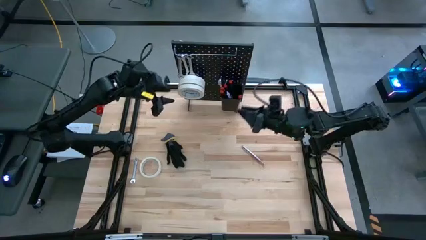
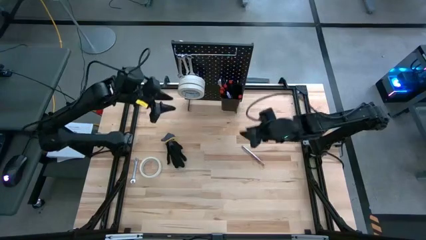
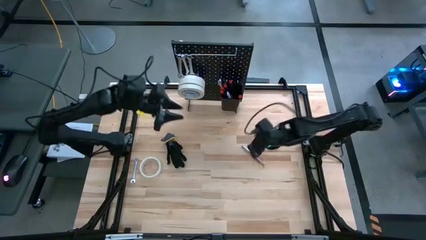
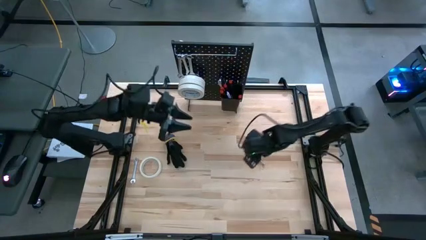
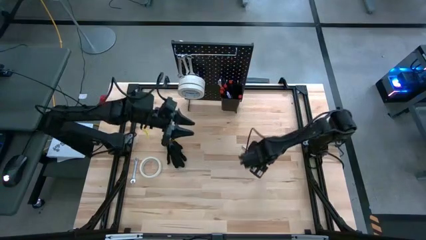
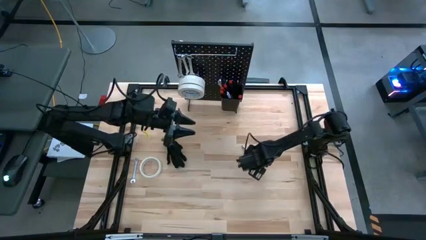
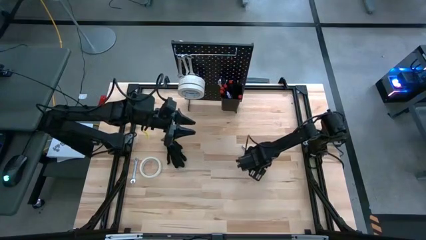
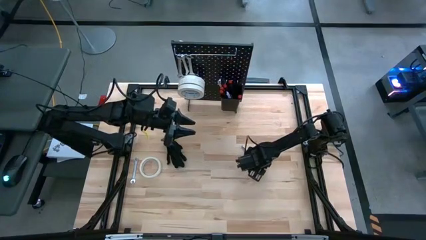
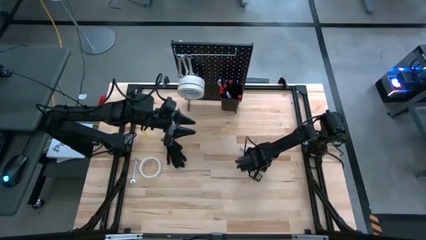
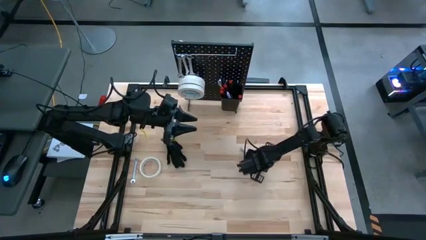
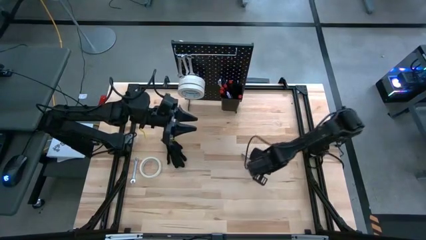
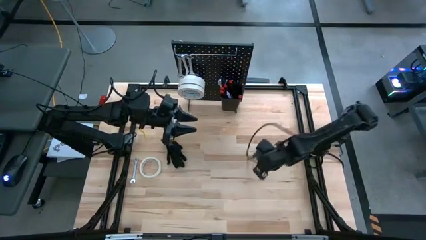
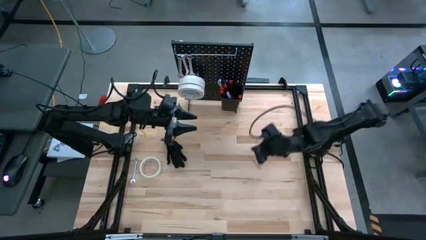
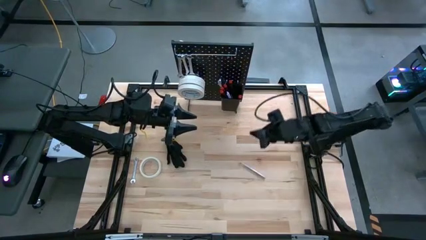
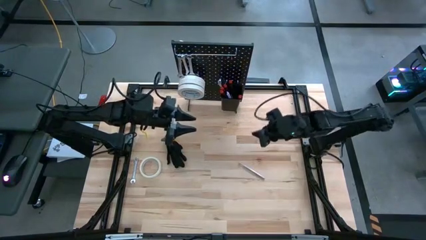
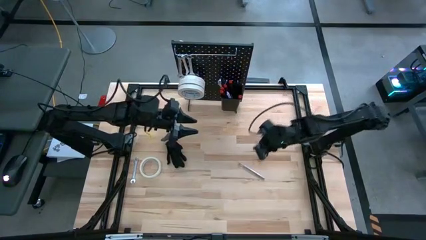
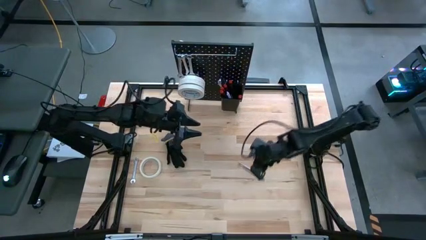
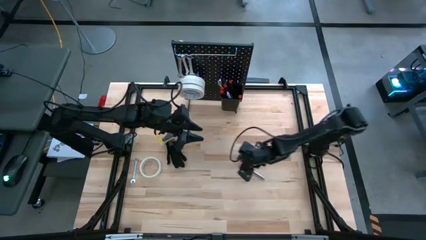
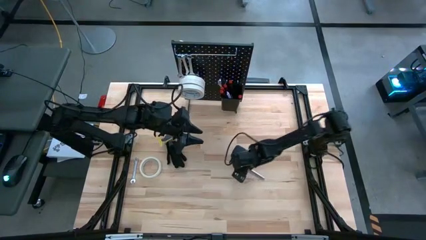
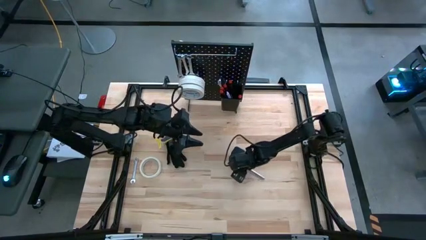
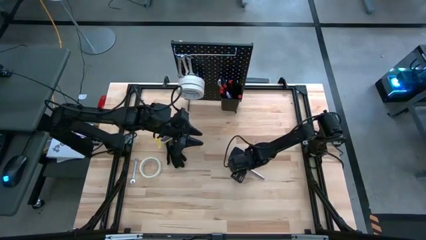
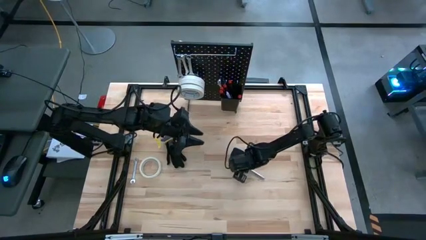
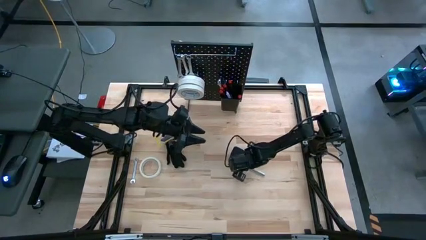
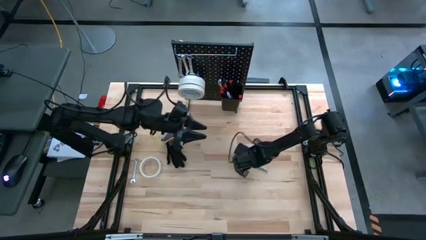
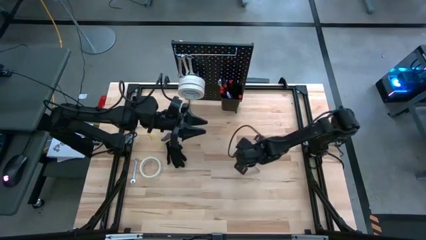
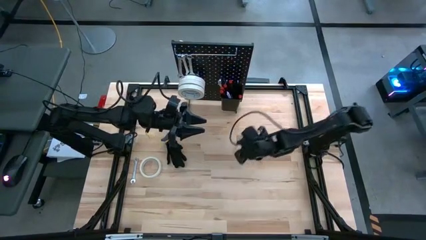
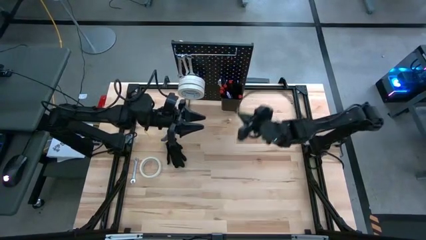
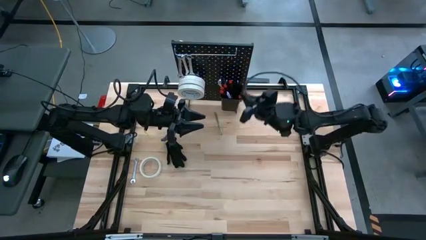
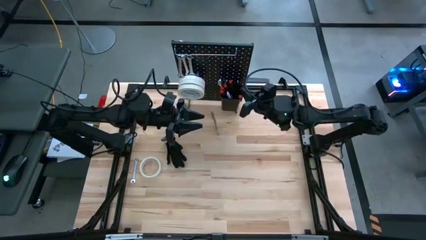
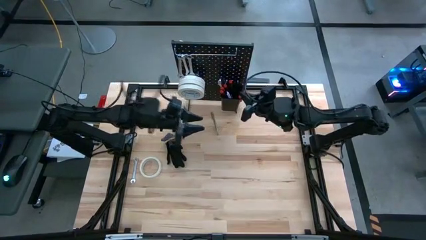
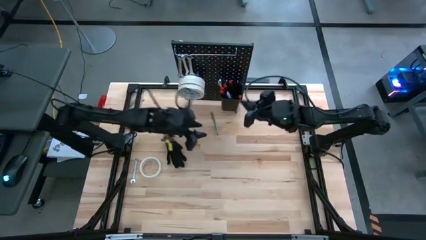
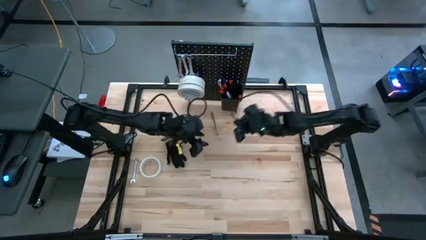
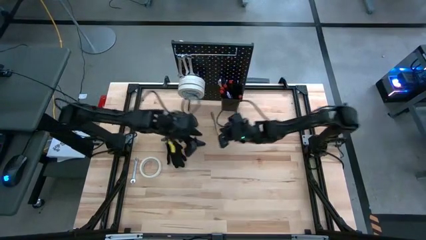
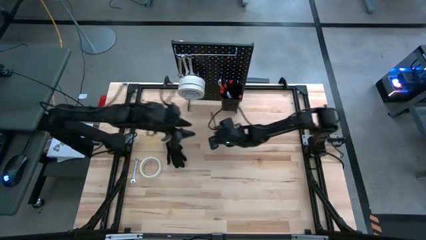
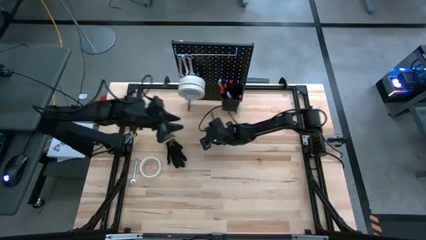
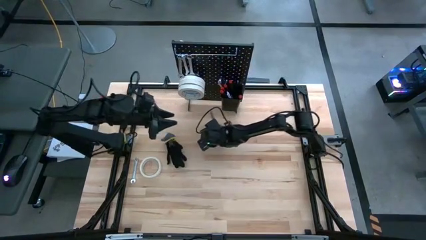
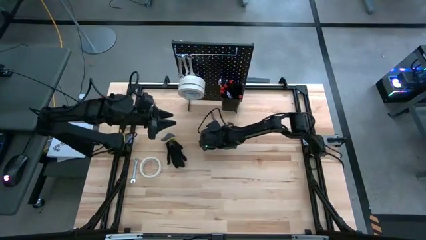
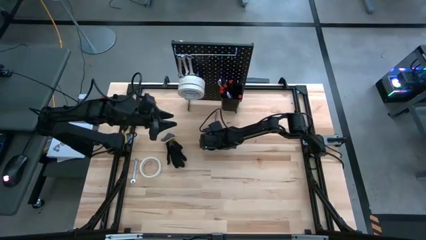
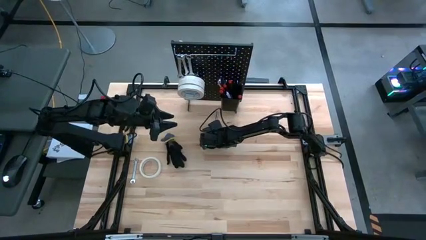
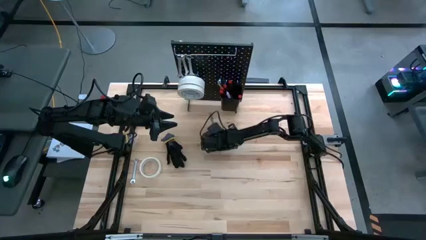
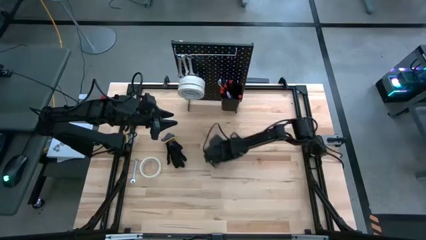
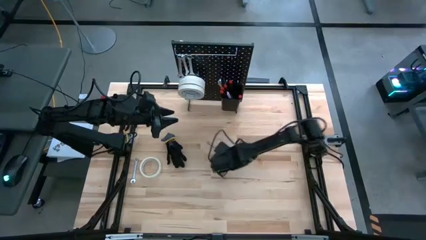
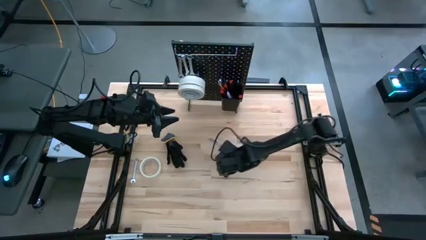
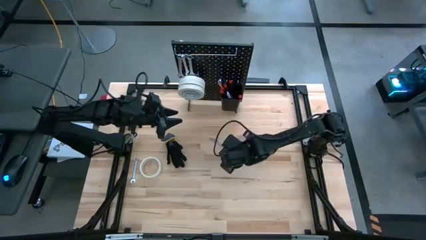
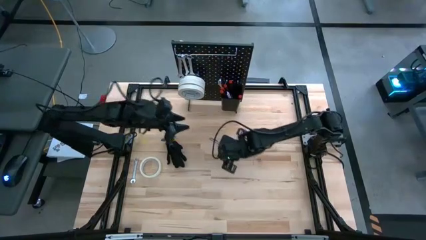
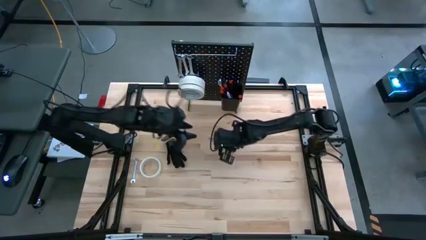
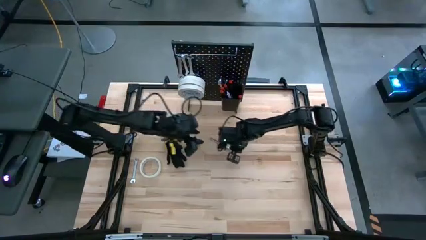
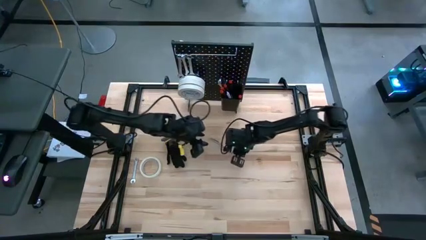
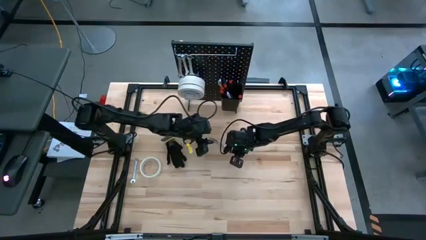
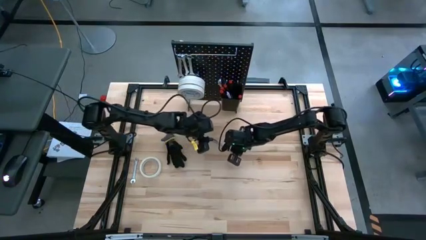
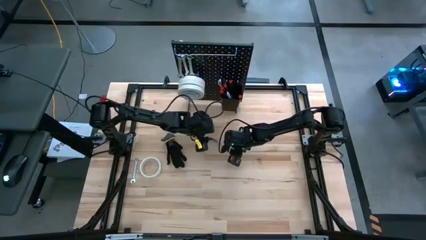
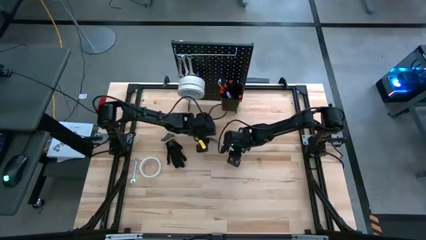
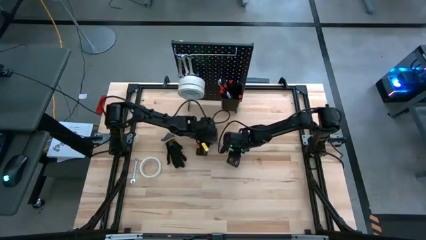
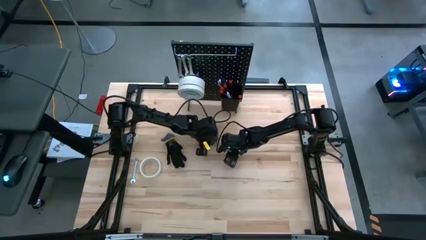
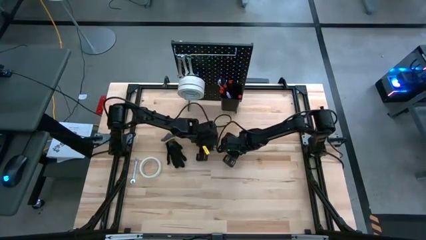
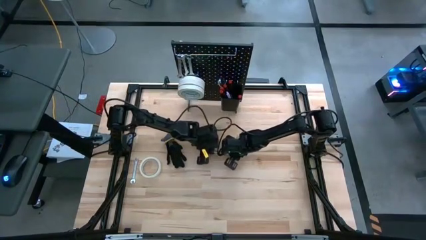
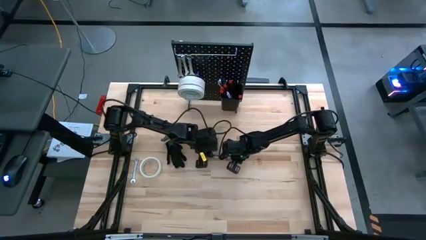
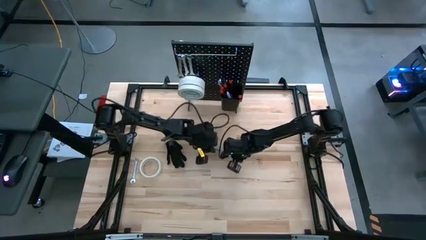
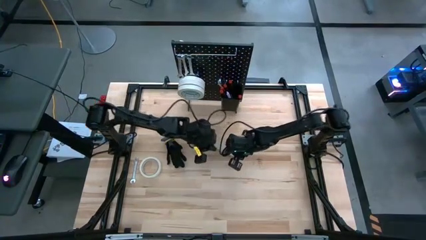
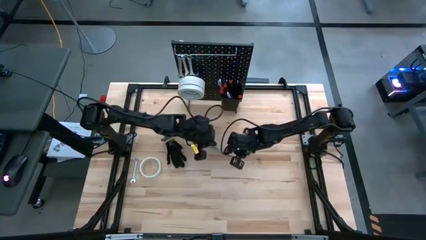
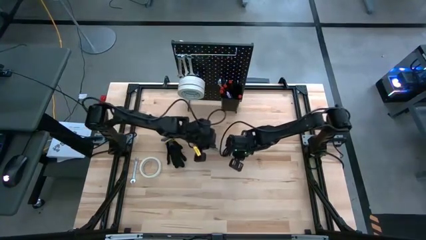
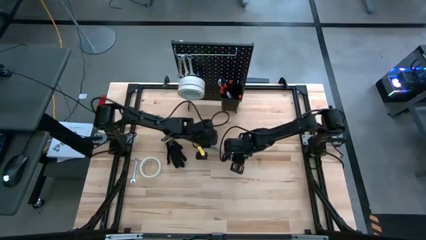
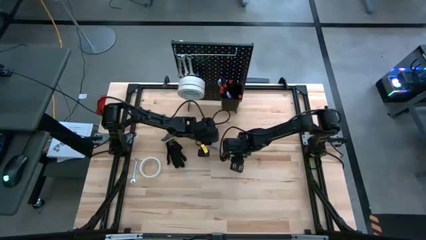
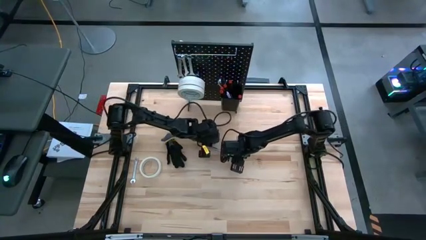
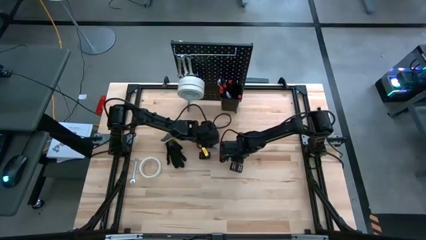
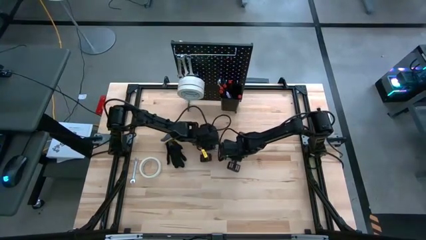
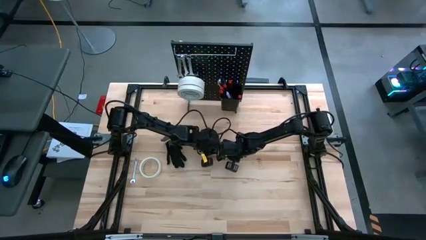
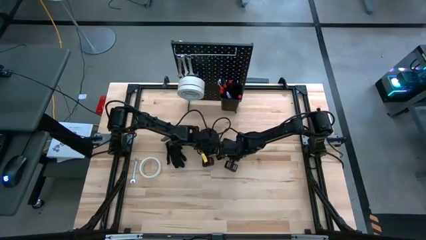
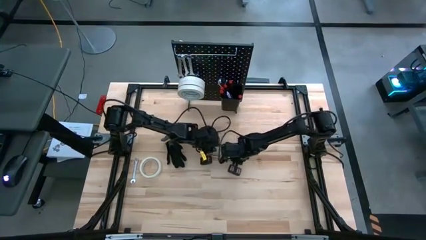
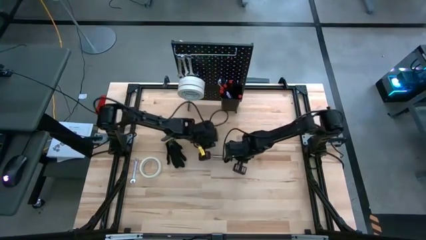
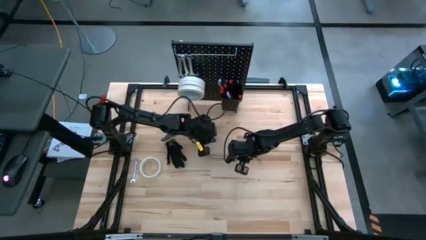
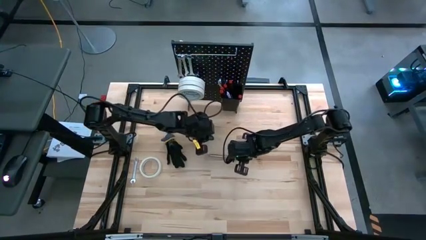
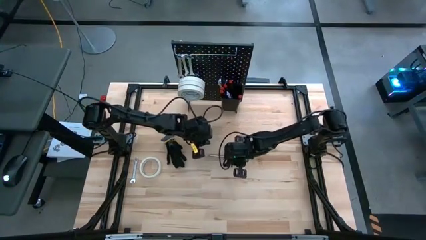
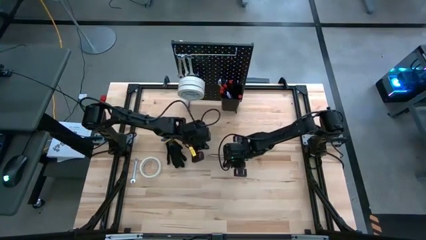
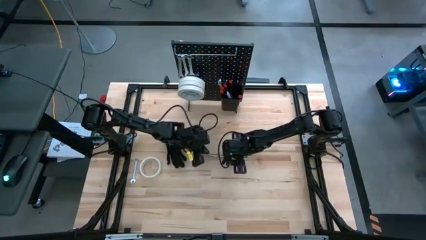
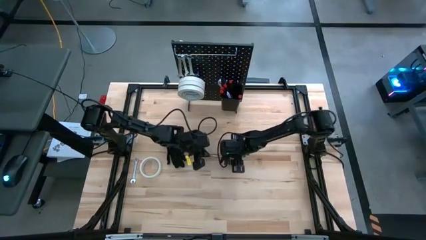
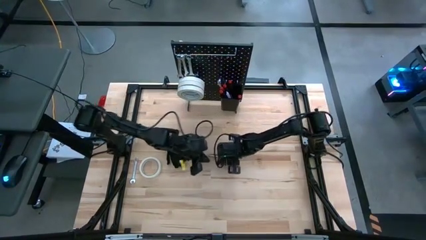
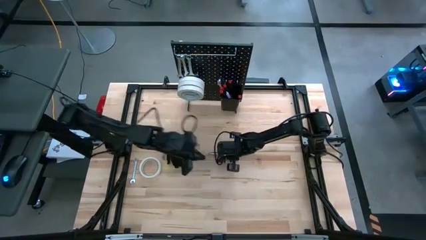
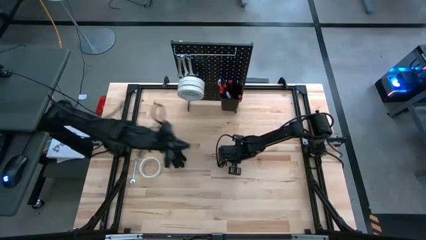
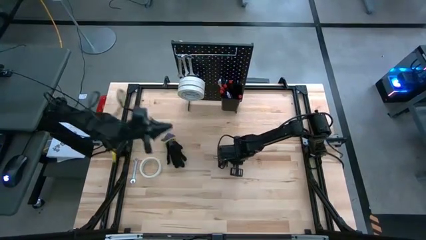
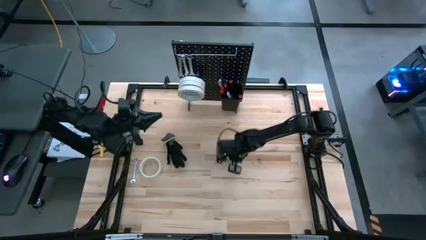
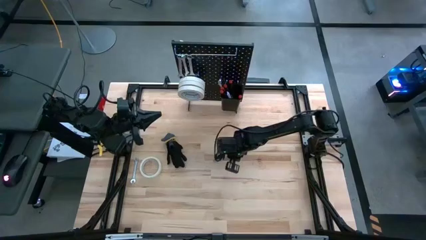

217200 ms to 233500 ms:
Task: Hang tools onto peg board
Put the magnetic telescoping into the black bin on the peg board
